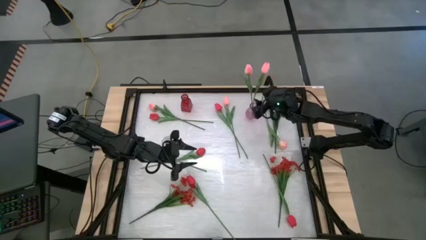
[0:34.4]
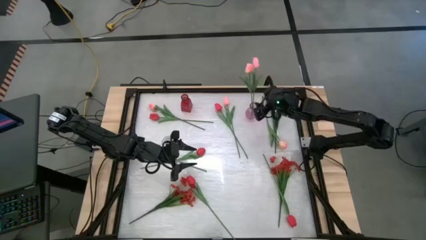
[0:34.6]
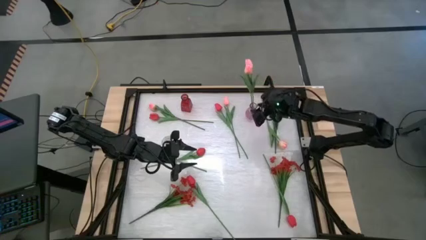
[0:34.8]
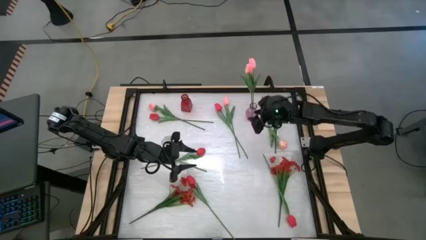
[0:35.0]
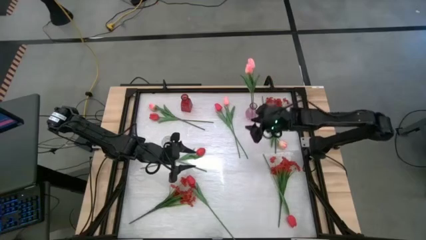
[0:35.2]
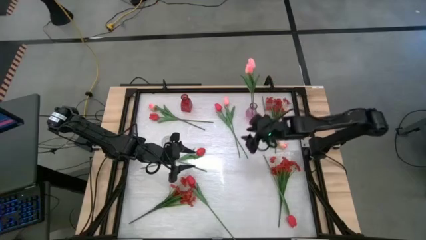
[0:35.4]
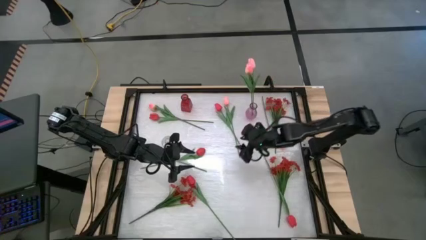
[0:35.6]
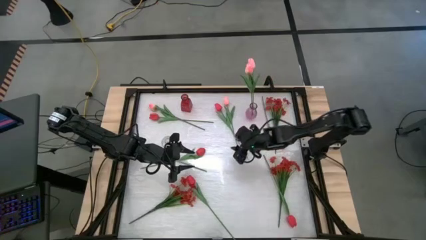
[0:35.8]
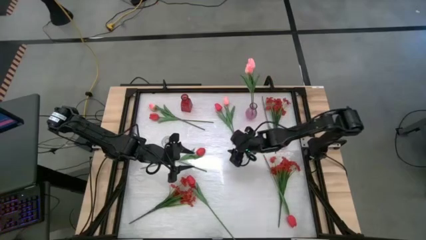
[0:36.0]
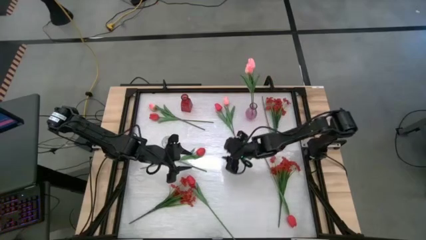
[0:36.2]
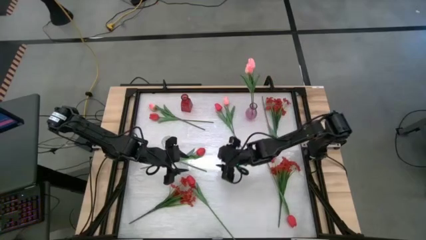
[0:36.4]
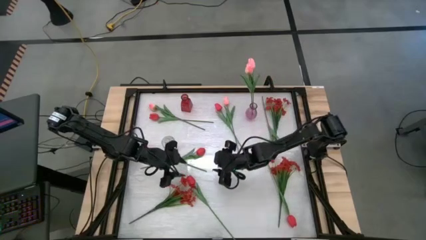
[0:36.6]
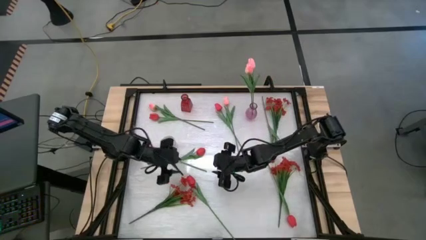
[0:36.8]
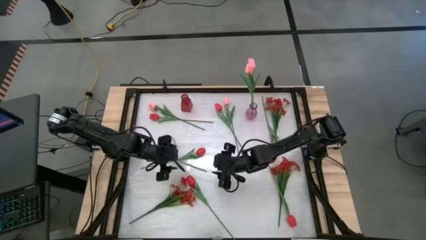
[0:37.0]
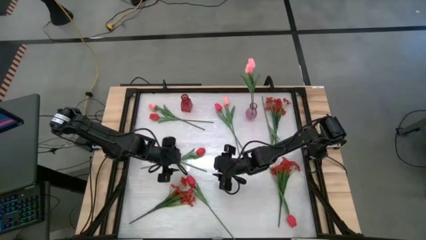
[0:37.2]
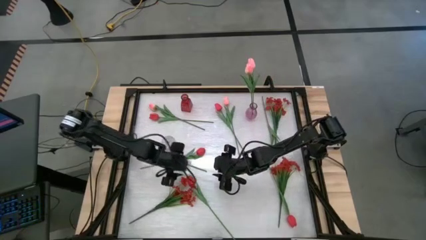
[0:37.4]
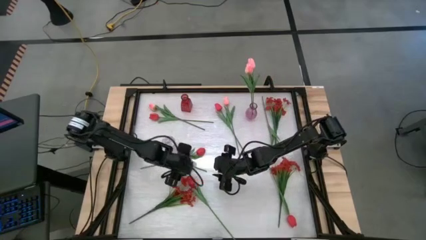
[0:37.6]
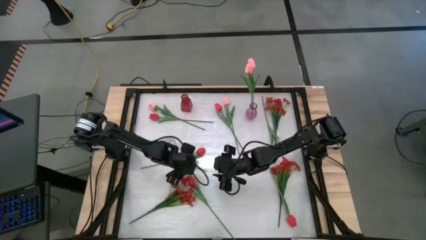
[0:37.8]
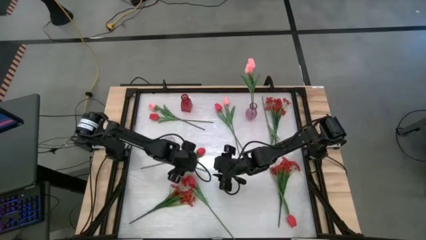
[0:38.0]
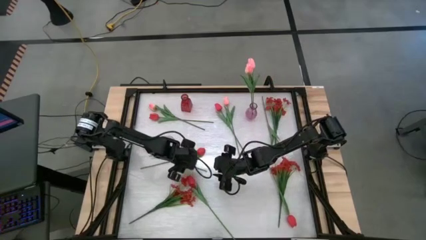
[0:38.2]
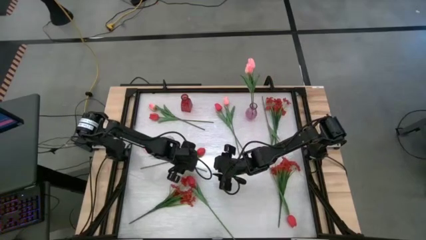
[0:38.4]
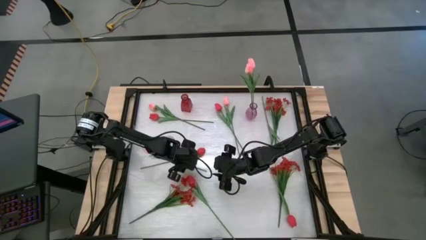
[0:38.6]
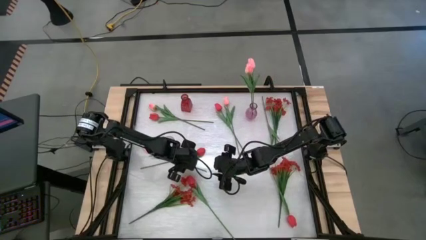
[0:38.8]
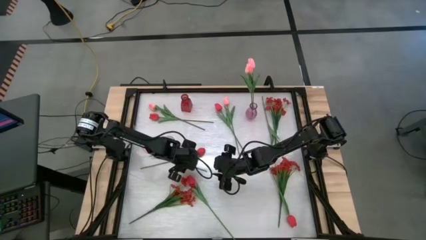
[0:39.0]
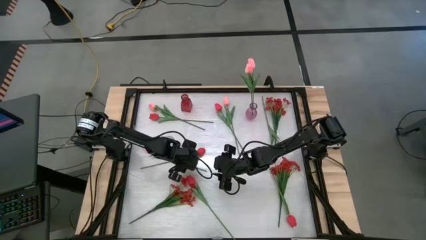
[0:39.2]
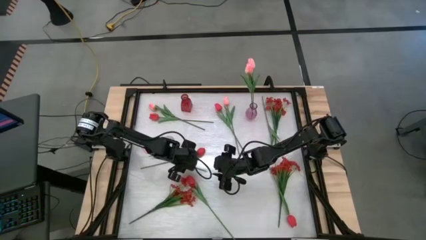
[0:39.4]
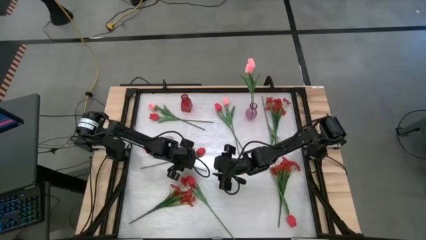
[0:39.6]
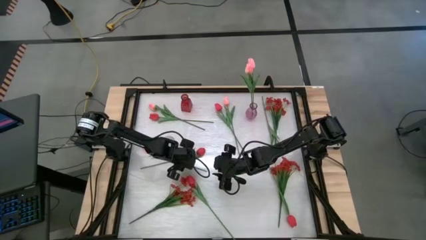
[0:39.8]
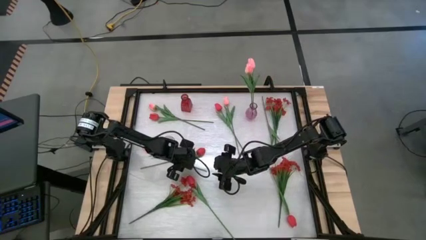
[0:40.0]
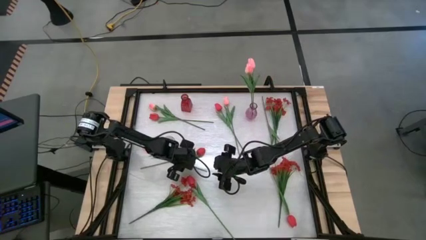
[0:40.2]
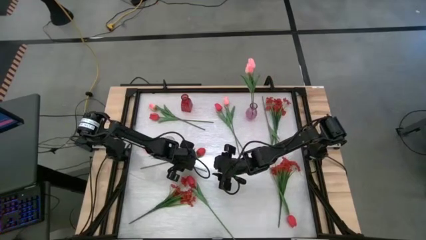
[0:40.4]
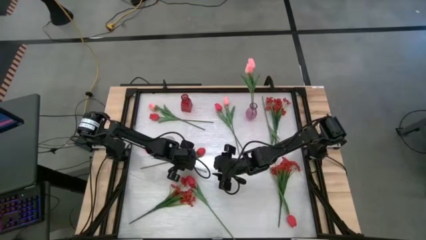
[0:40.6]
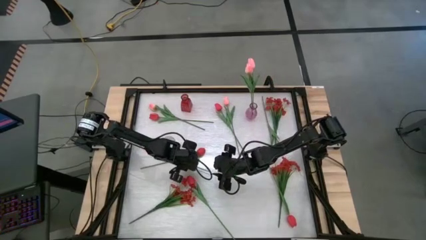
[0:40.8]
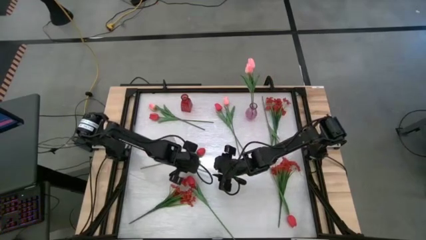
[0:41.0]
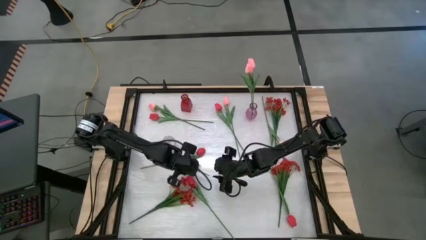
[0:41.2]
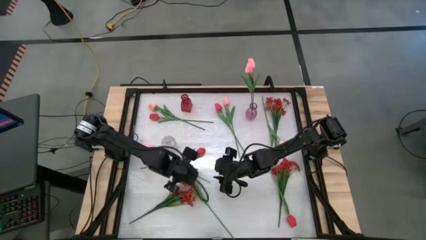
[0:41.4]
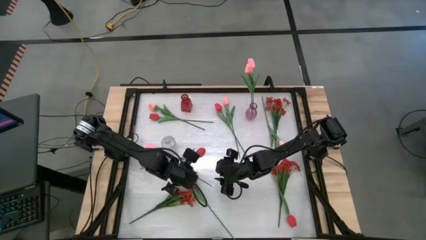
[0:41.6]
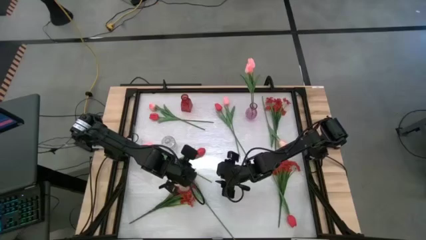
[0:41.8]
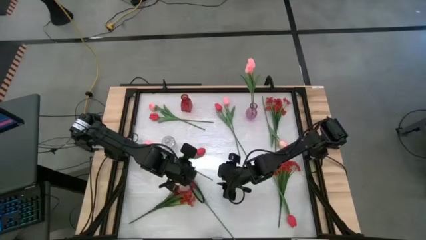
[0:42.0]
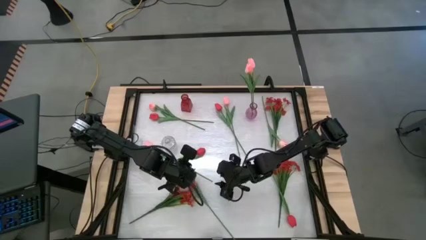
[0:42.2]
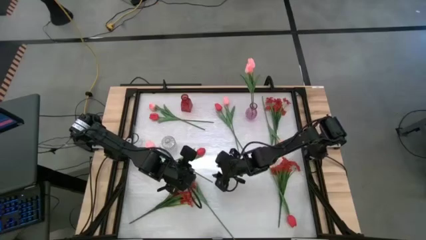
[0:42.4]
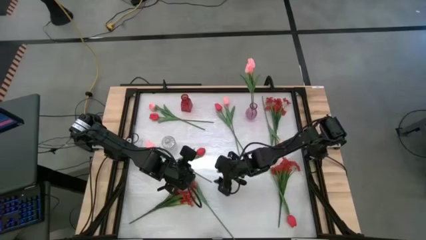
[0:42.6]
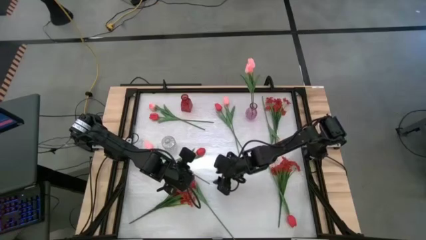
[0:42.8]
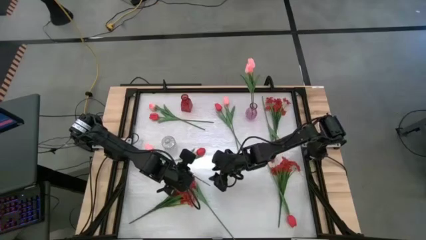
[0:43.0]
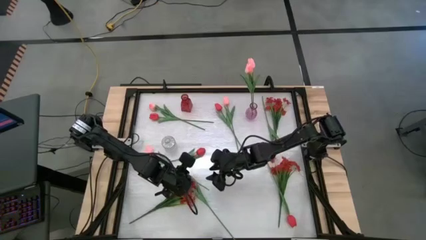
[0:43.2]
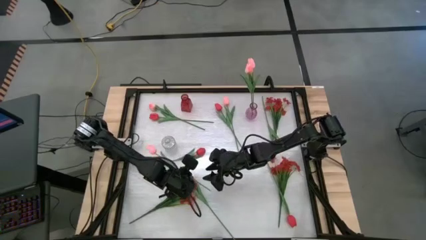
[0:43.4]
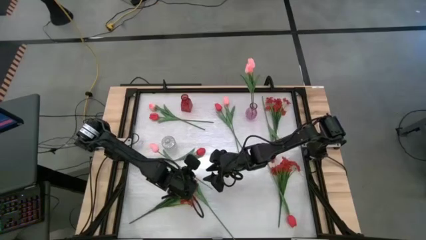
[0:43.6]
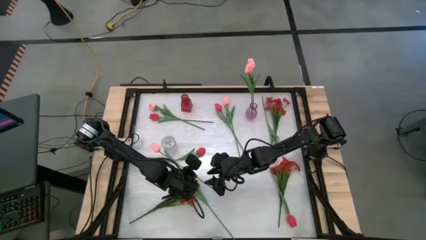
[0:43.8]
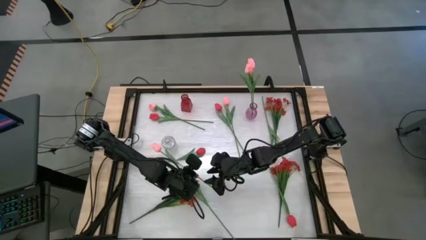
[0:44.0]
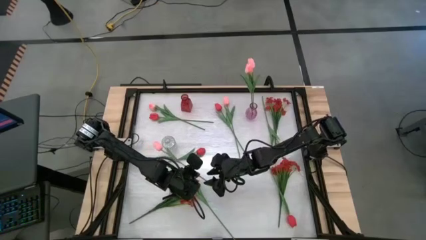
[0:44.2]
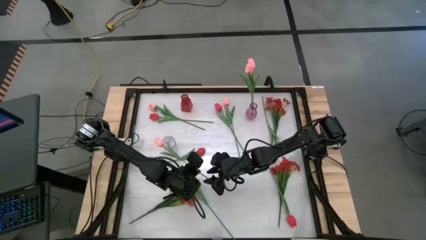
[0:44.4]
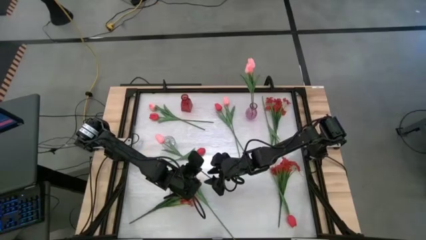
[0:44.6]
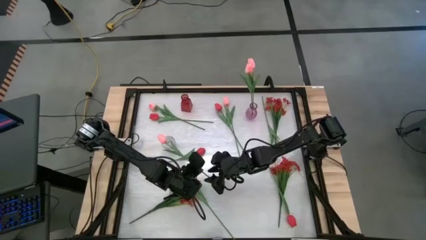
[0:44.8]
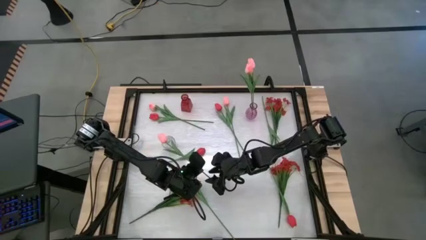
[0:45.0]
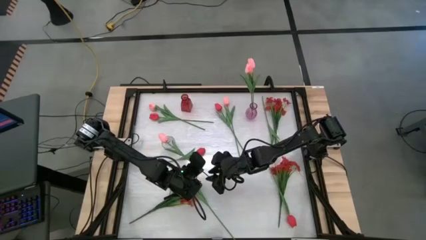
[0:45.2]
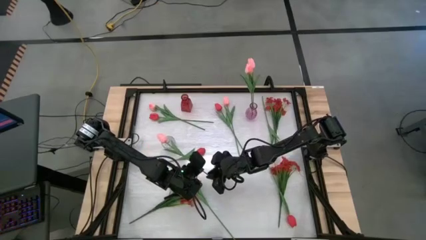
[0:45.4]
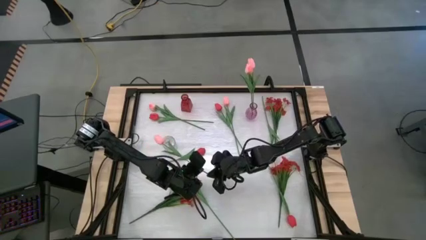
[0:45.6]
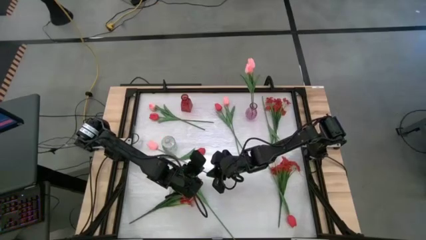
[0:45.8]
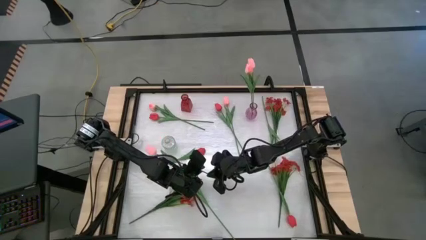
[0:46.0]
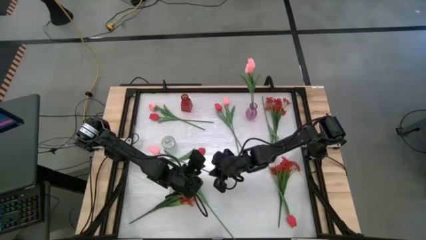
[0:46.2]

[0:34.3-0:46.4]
Task: Sort flowers into vase by color
Put the pink tulip into the purple vase

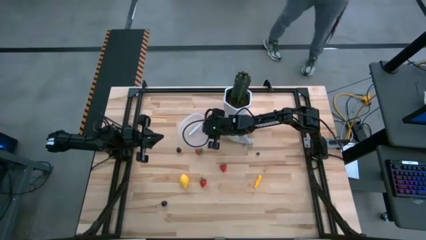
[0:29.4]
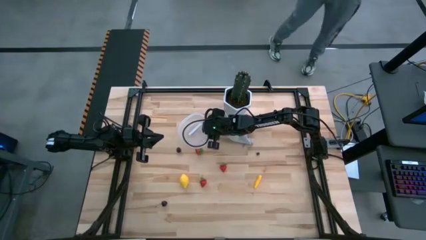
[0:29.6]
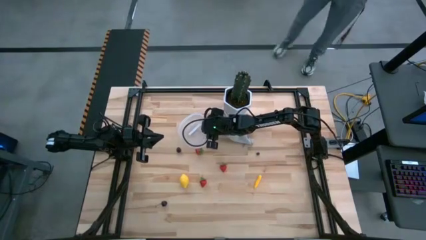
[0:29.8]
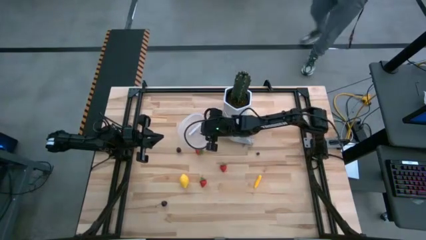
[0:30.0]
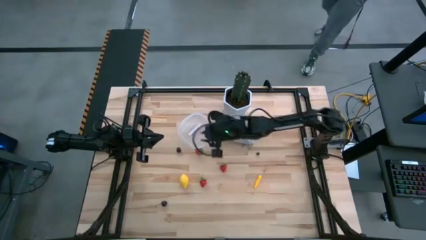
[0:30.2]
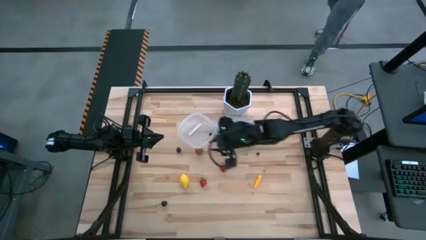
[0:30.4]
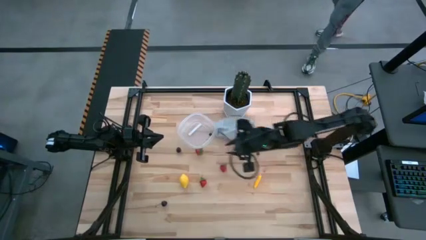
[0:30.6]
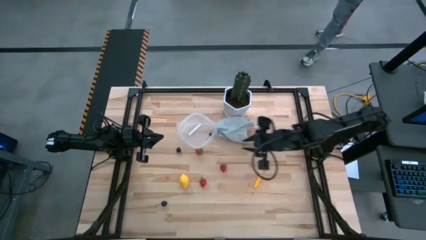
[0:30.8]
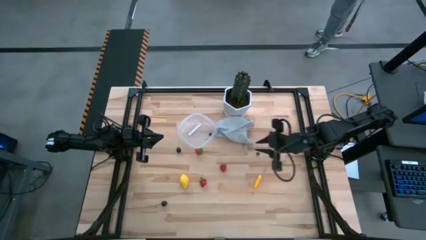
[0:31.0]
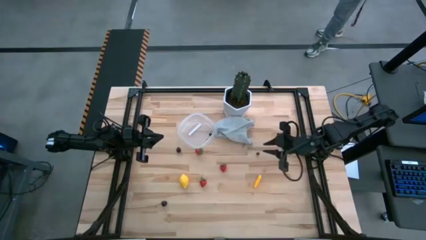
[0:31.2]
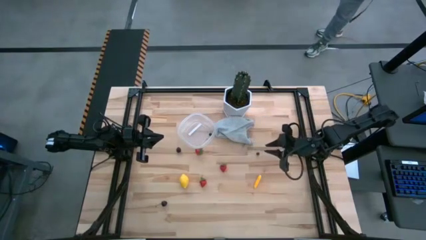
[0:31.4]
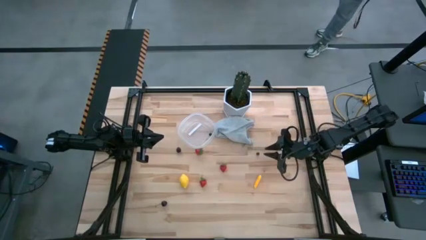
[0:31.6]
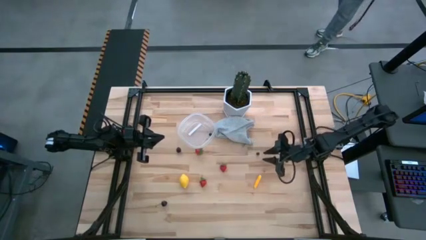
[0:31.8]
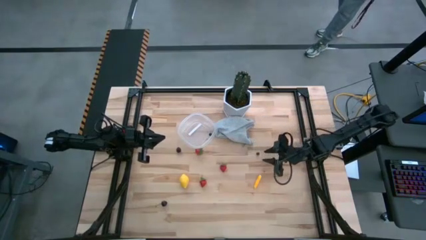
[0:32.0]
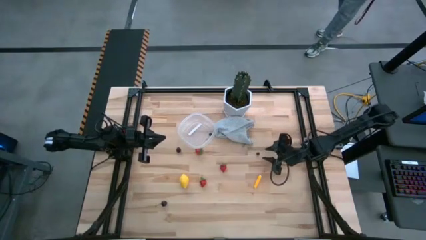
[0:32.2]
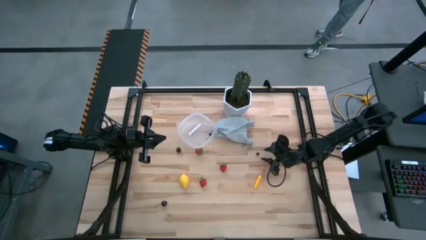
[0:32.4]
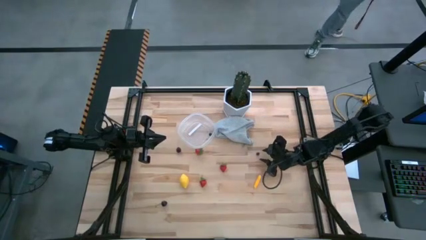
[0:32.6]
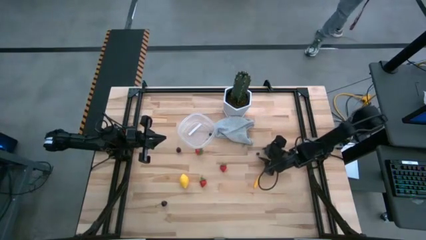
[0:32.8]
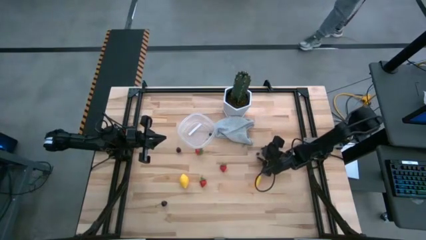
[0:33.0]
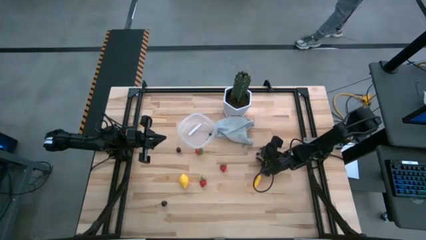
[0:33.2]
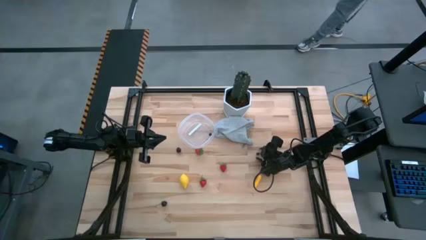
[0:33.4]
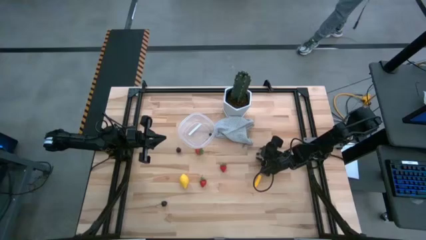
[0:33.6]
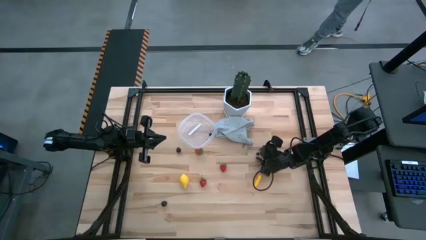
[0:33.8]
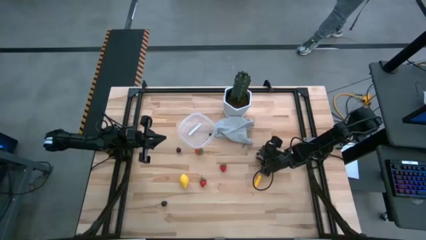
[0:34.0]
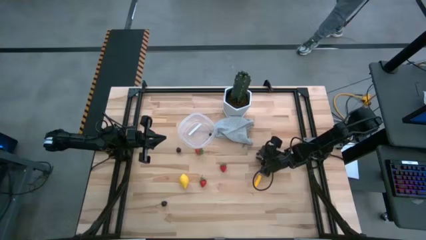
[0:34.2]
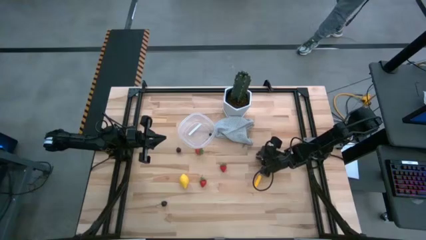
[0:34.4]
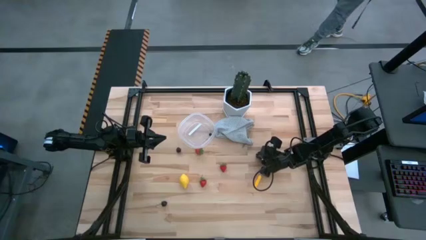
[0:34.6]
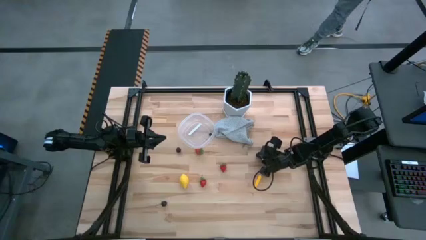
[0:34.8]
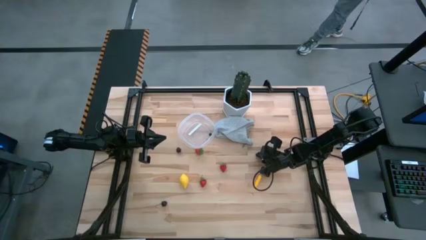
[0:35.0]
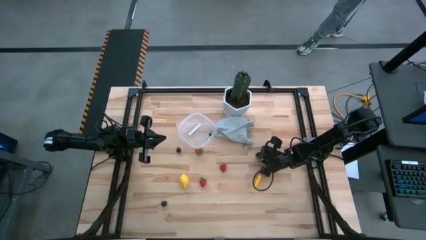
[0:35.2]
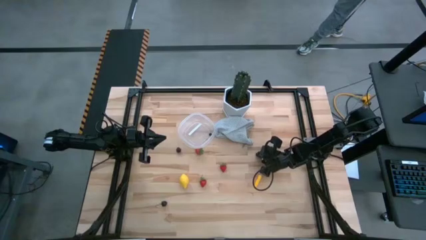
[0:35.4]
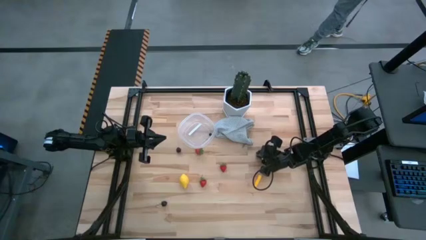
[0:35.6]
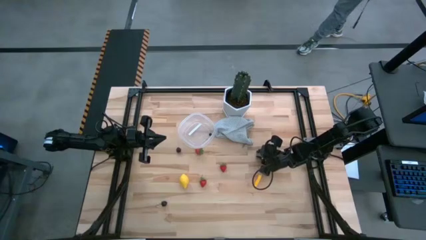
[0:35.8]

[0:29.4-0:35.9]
Task: Pick and placing Produce into tupperware
Put the blueberry into the transparent bin
